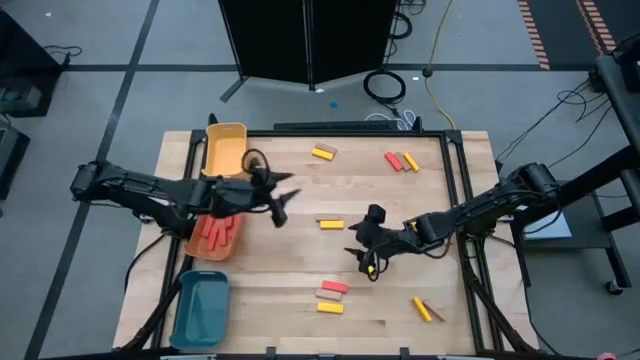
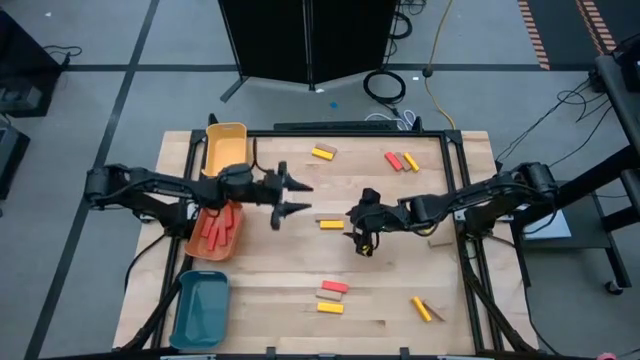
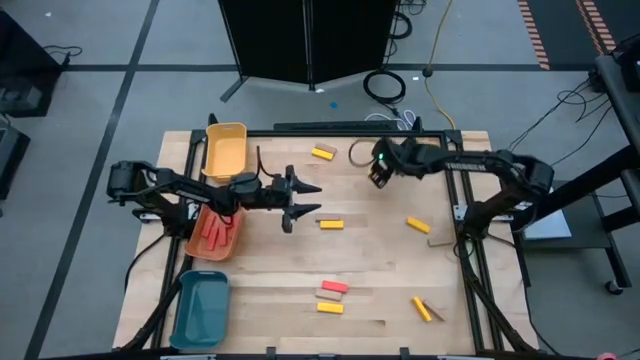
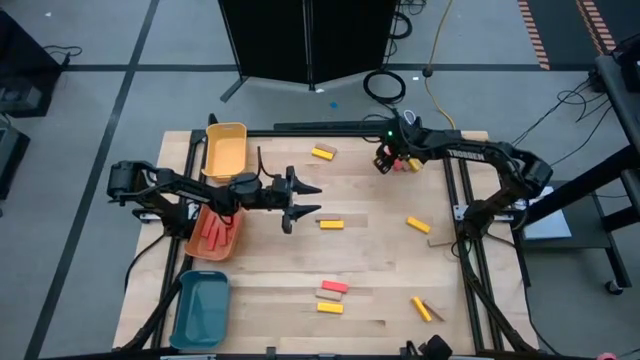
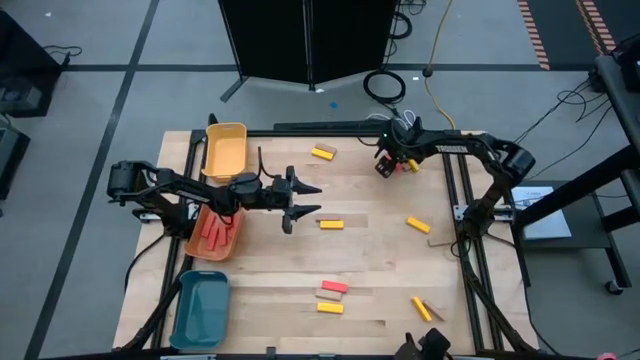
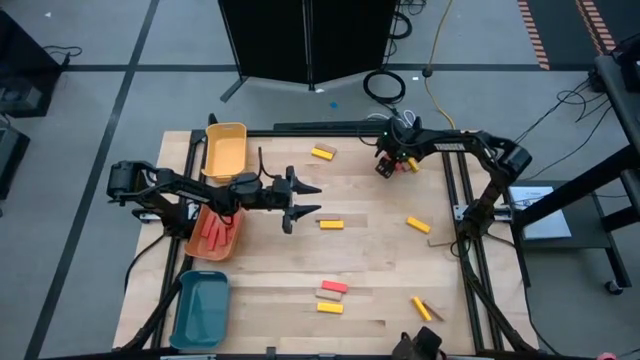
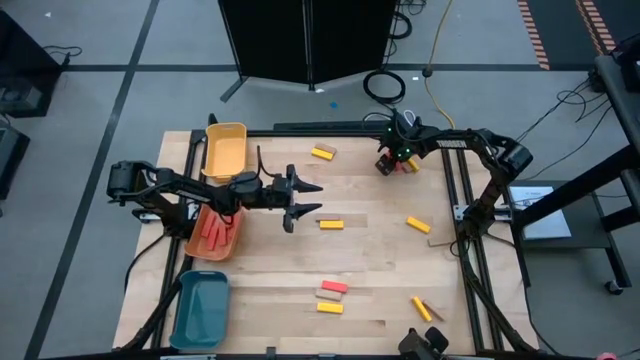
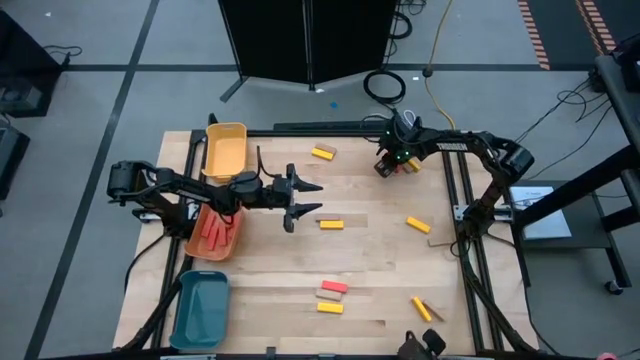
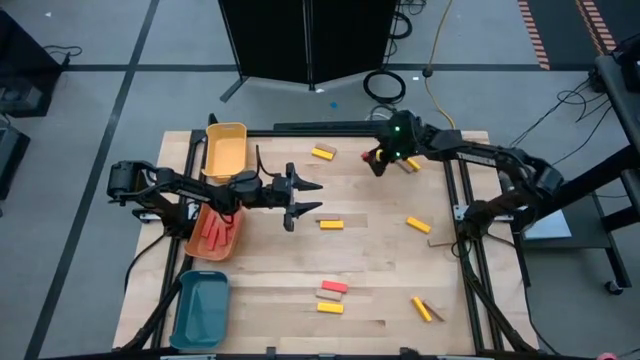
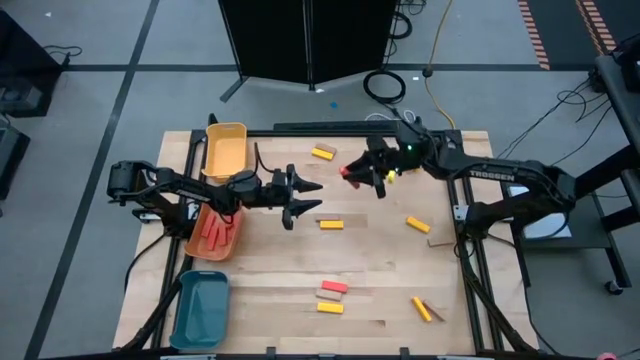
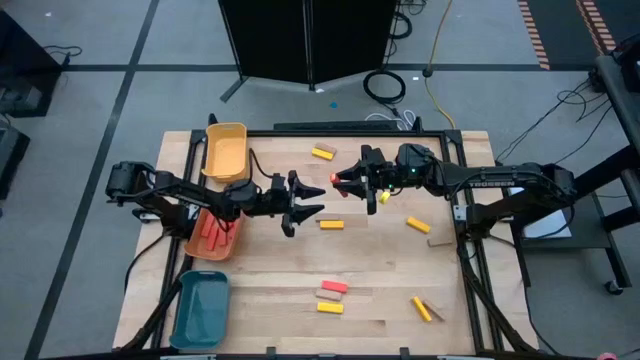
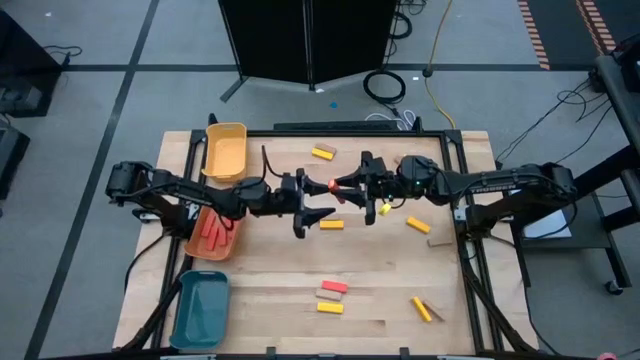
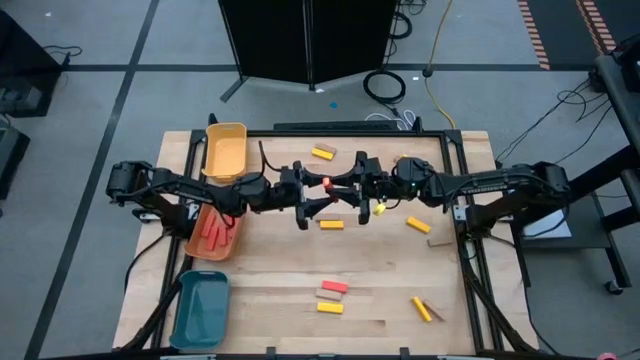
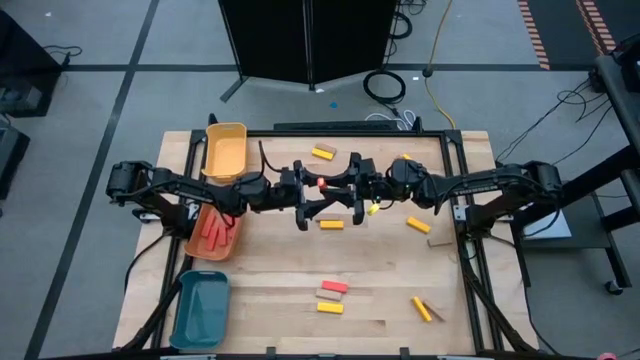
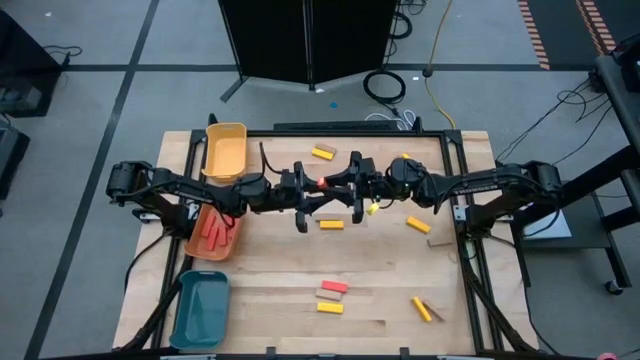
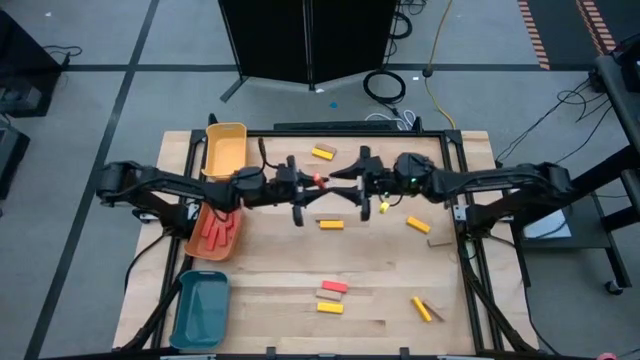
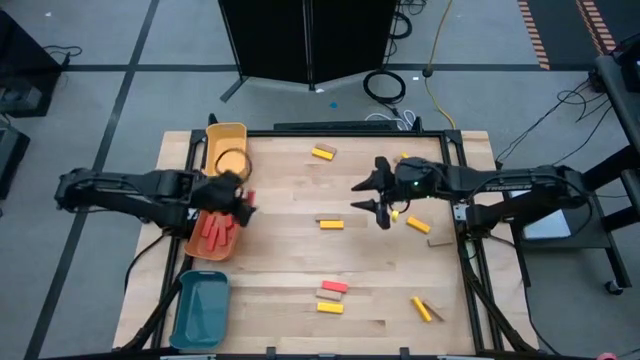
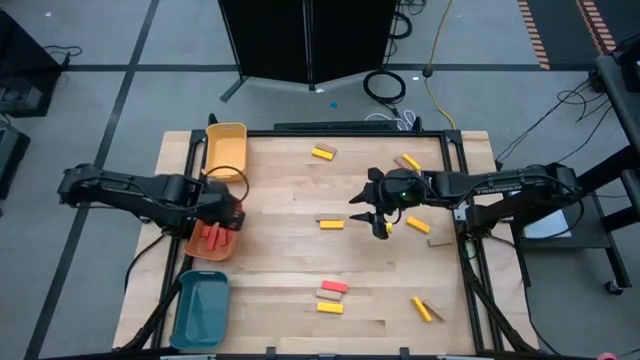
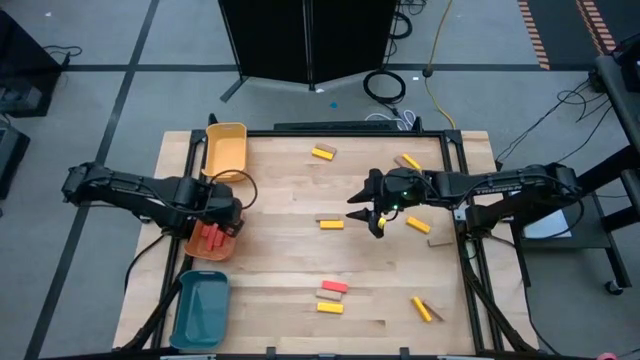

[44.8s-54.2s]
Task: Sort blocks
Put the top red block in the orange bin

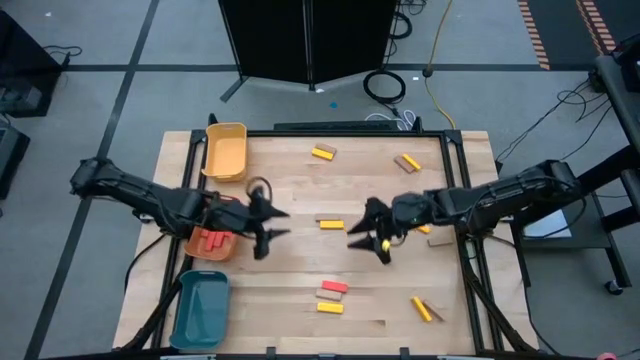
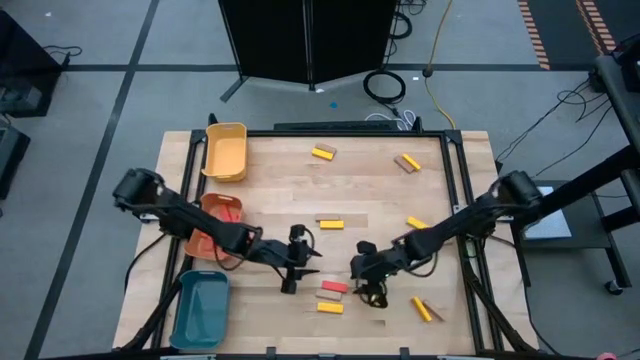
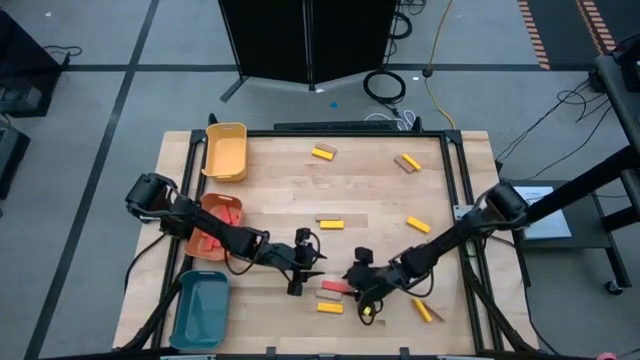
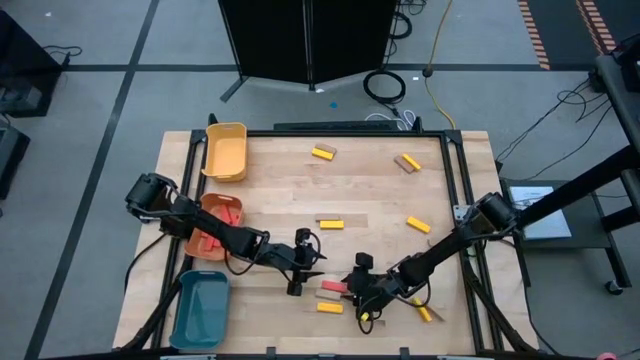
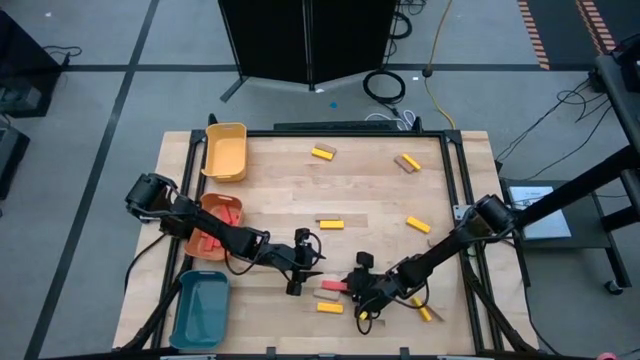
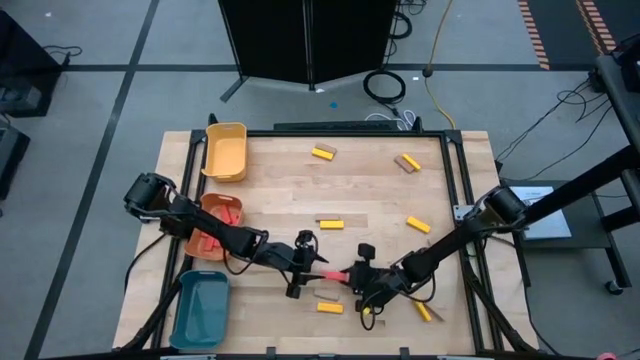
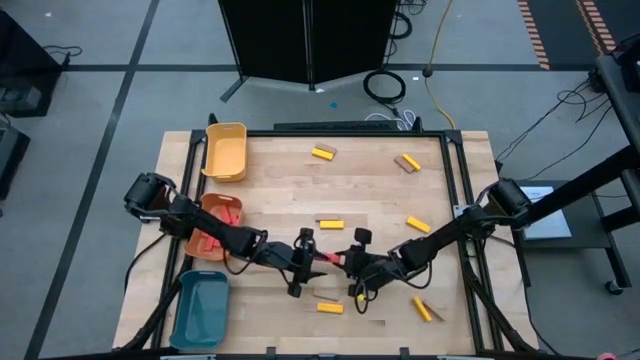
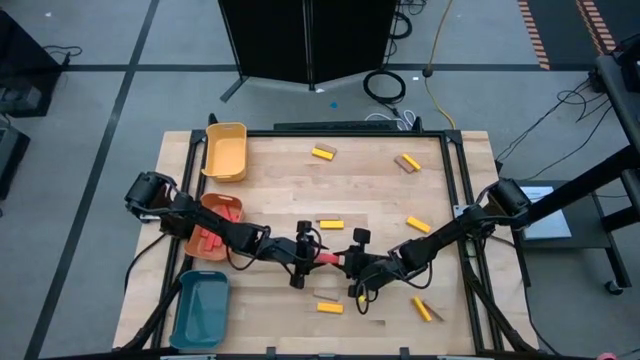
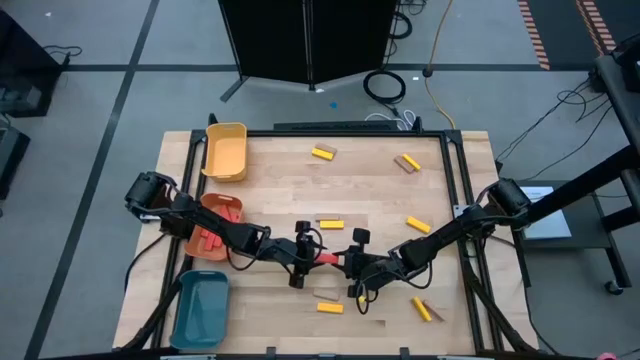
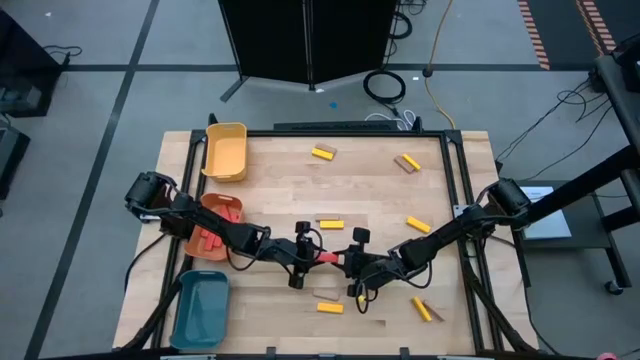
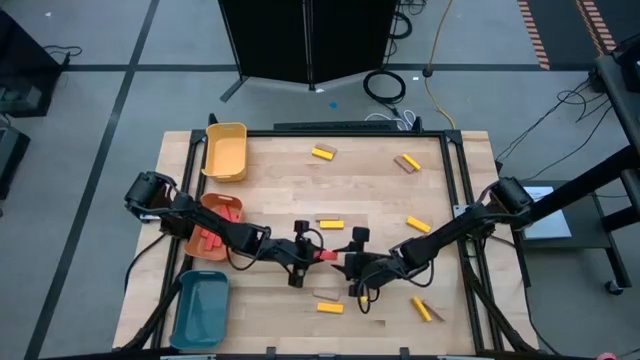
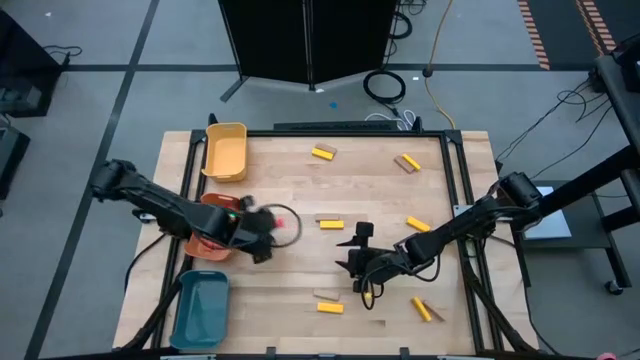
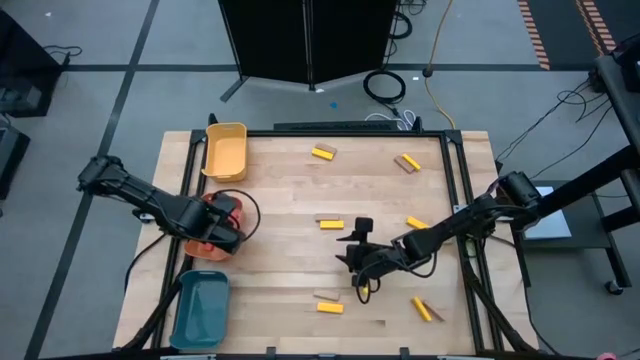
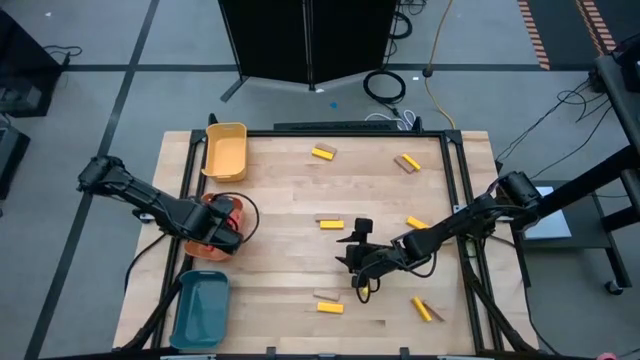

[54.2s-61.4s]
Put the red block in the orange bin

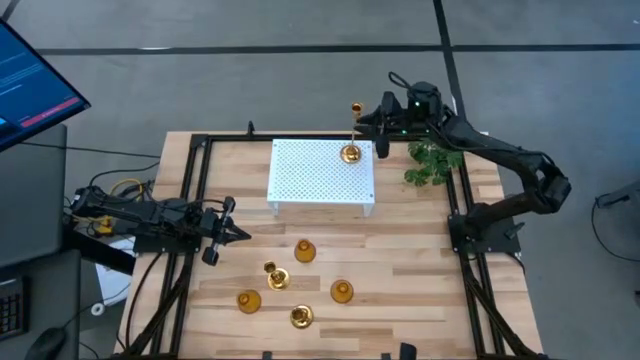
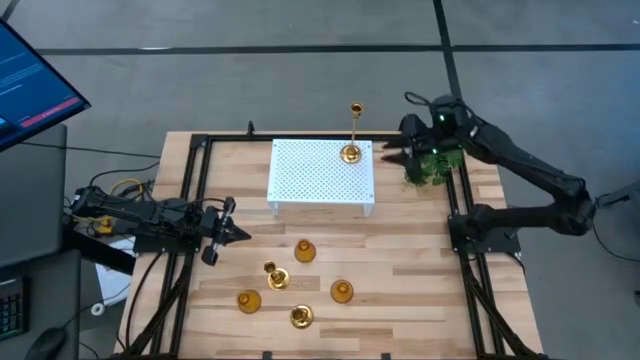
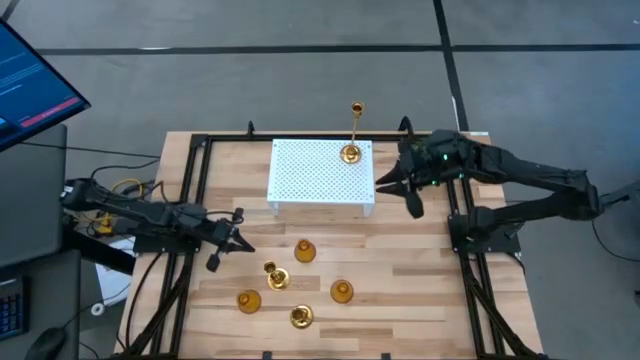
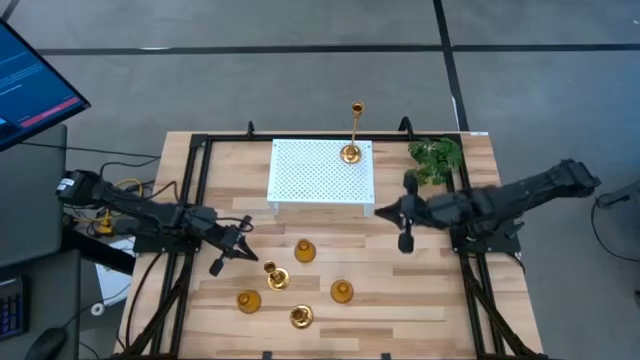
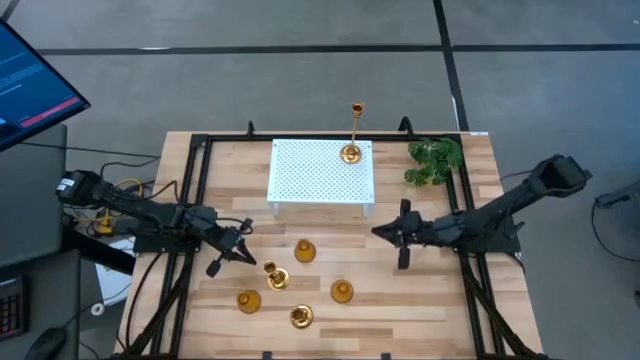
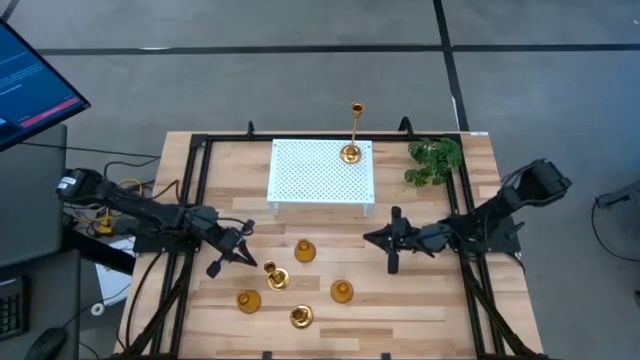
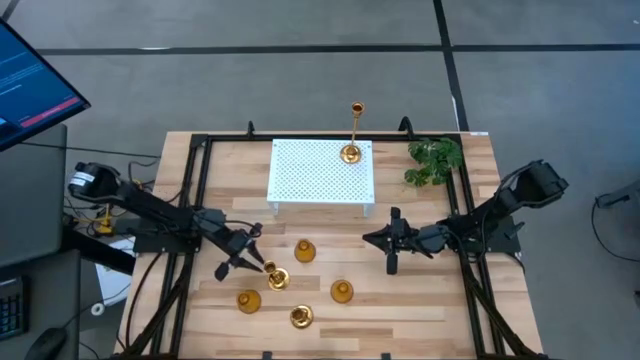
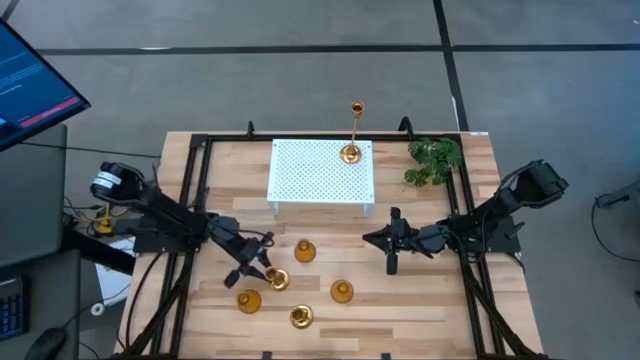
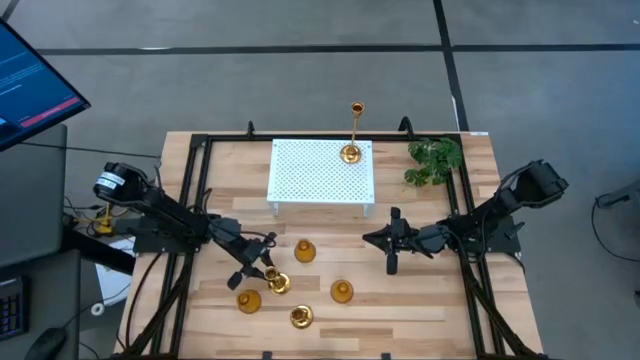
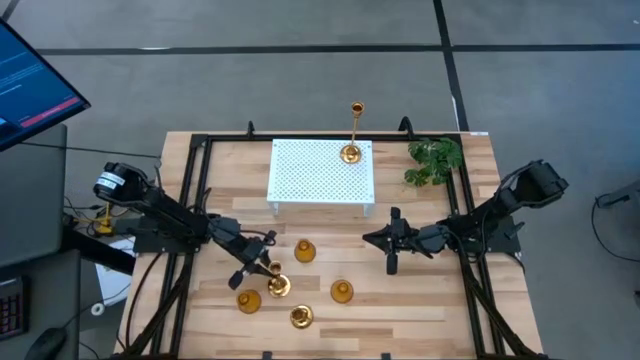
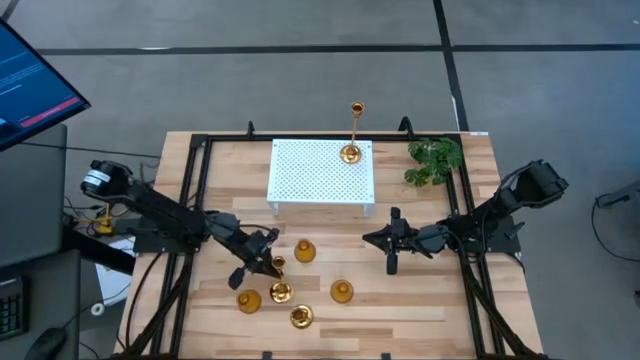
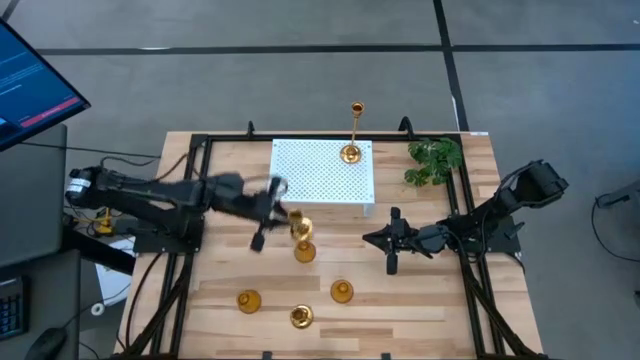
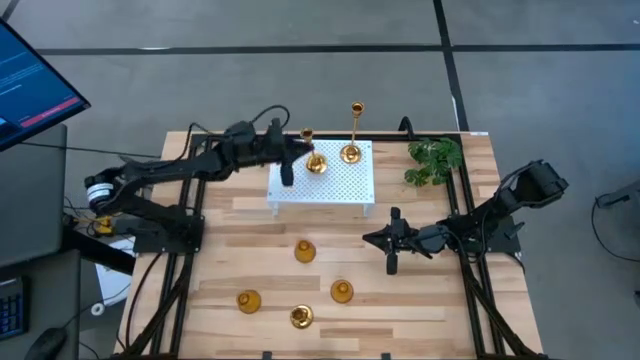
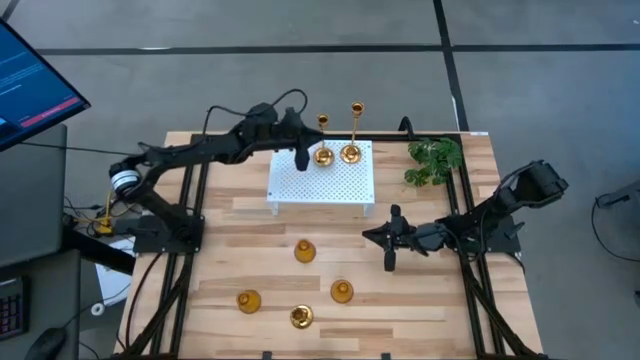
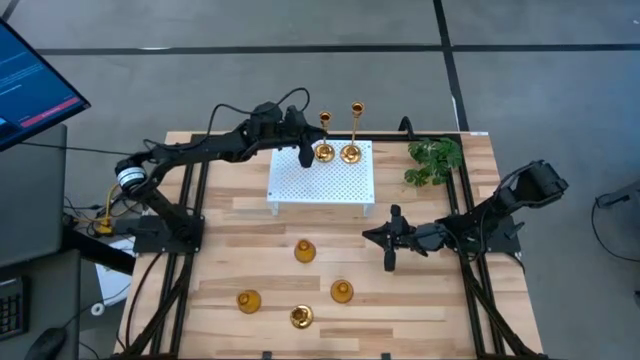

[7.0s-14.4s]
Task: Pick & Place candle stick holders
Put the top gold candle holder on the shelf aligned with the other gold candle holder
